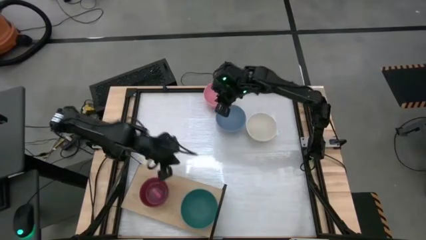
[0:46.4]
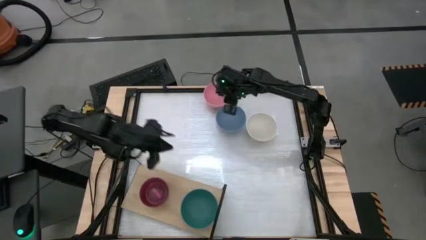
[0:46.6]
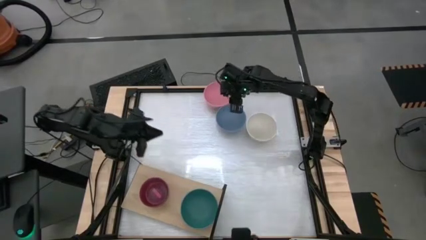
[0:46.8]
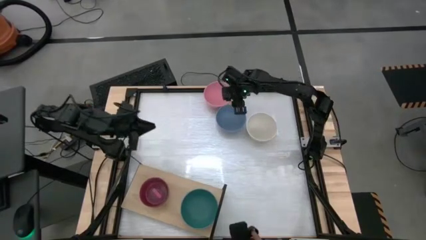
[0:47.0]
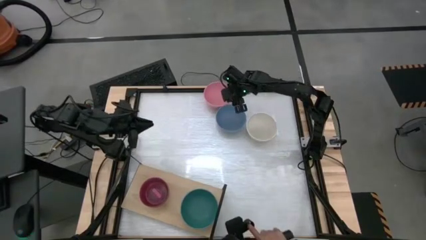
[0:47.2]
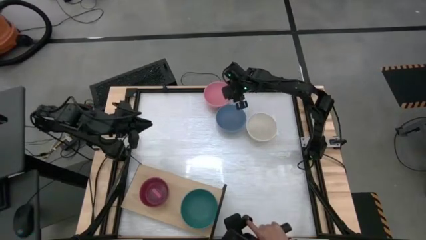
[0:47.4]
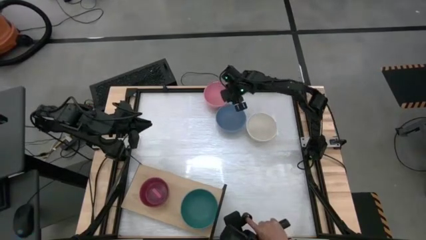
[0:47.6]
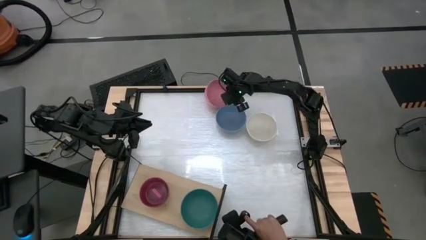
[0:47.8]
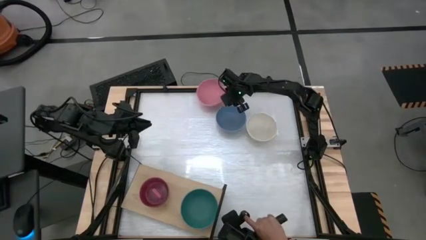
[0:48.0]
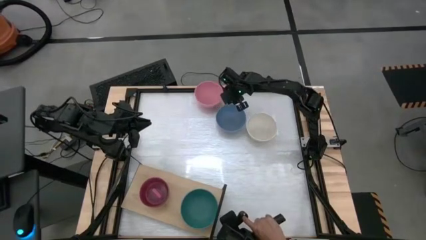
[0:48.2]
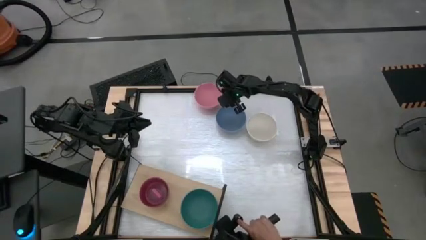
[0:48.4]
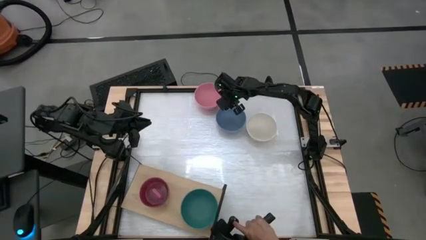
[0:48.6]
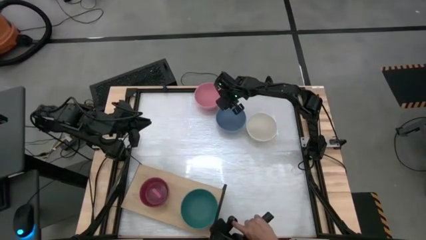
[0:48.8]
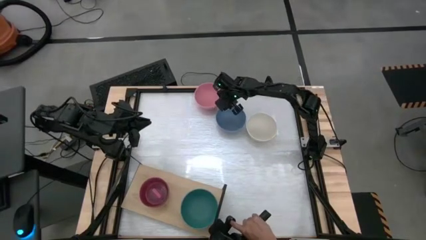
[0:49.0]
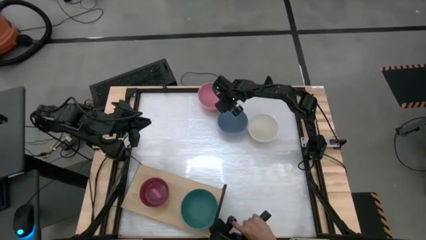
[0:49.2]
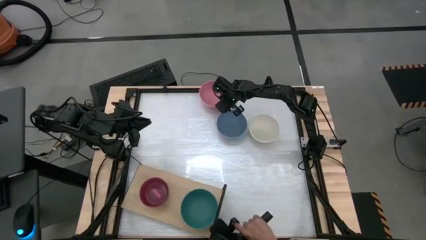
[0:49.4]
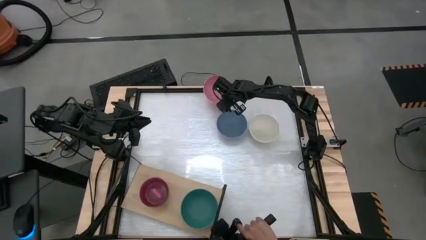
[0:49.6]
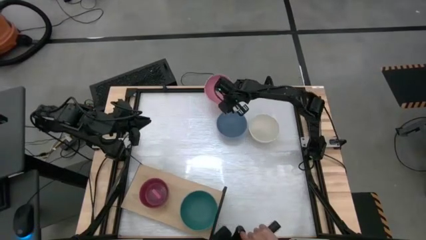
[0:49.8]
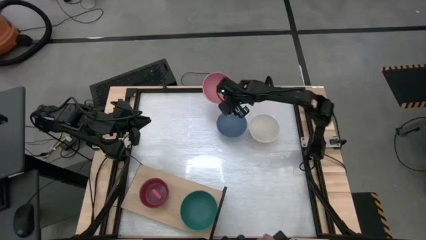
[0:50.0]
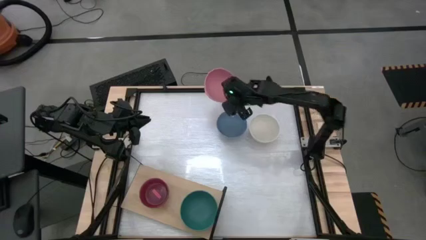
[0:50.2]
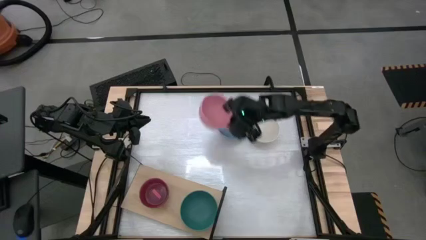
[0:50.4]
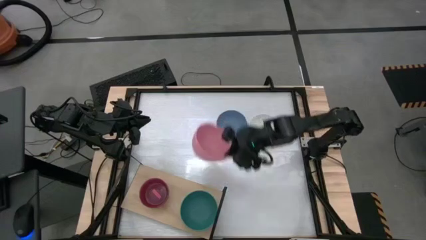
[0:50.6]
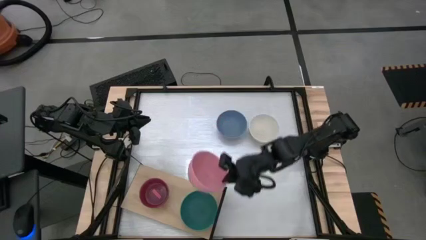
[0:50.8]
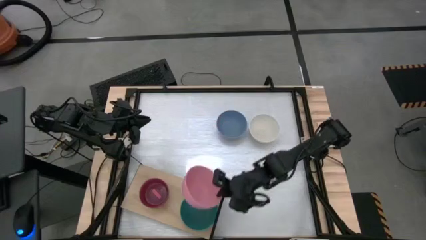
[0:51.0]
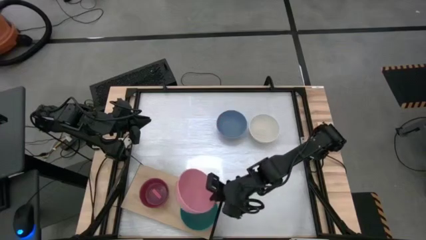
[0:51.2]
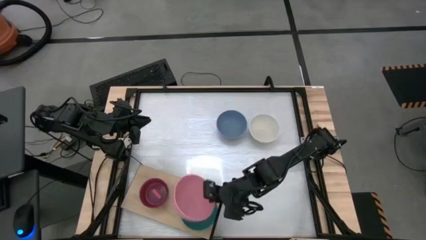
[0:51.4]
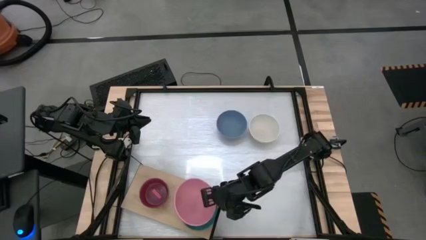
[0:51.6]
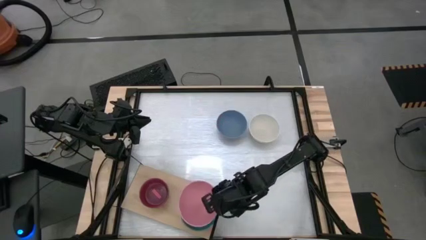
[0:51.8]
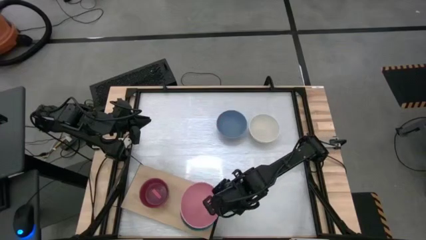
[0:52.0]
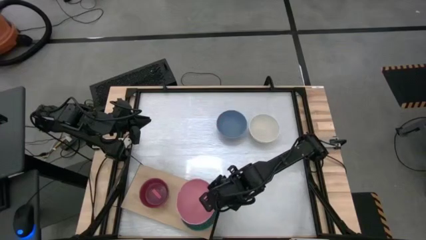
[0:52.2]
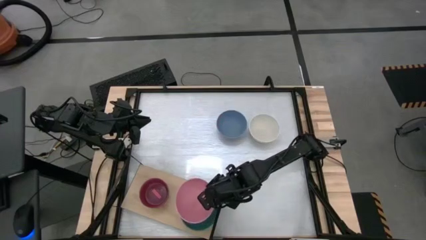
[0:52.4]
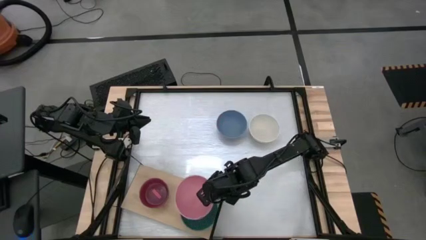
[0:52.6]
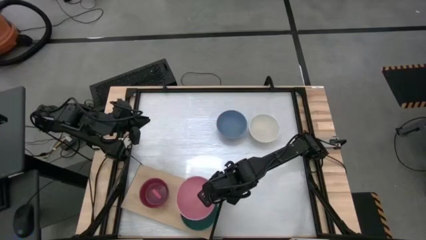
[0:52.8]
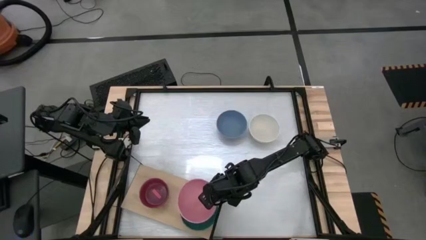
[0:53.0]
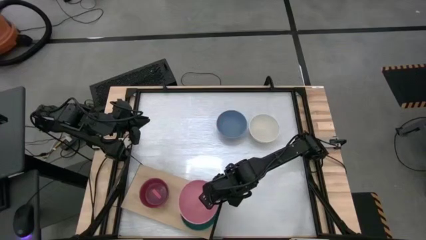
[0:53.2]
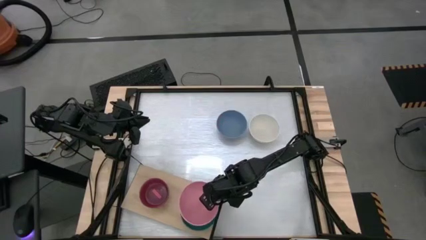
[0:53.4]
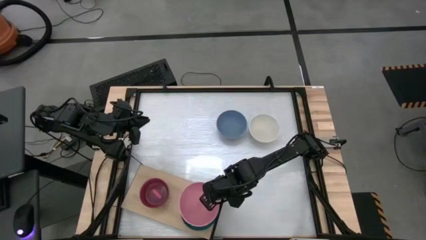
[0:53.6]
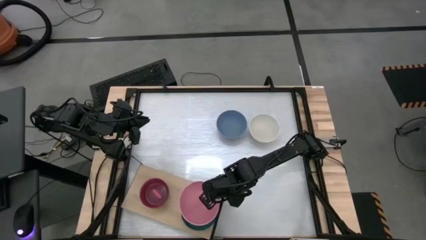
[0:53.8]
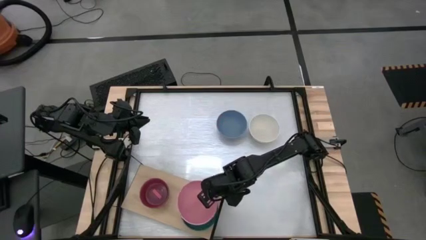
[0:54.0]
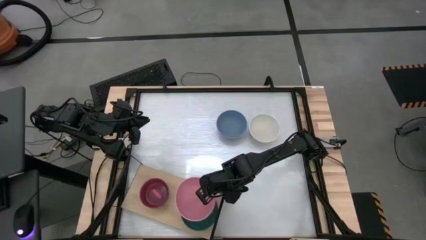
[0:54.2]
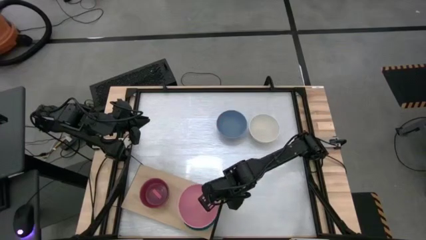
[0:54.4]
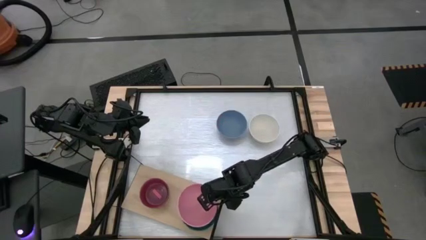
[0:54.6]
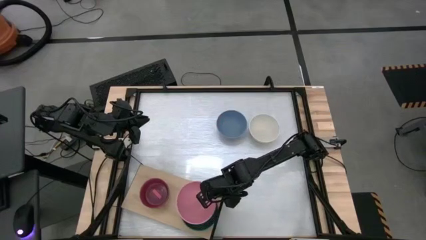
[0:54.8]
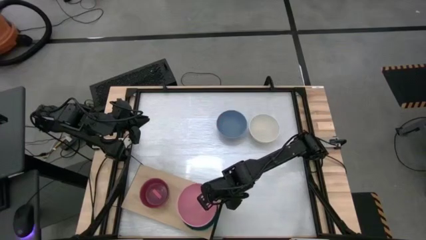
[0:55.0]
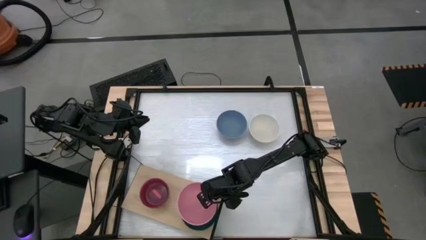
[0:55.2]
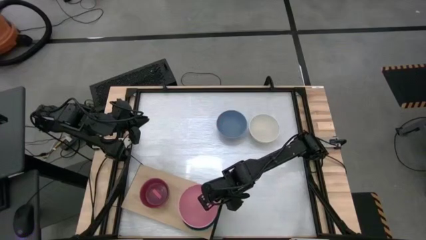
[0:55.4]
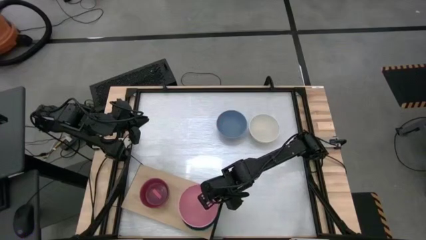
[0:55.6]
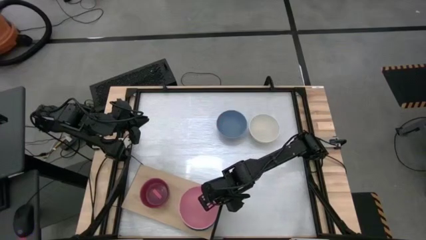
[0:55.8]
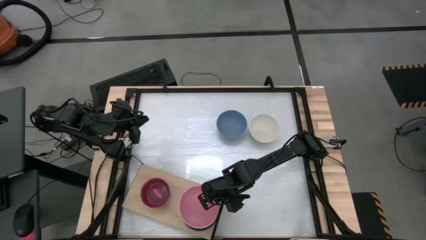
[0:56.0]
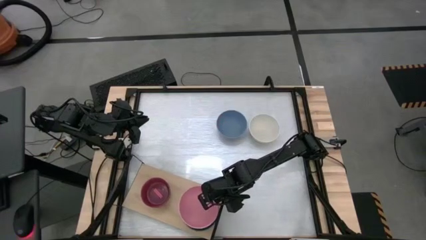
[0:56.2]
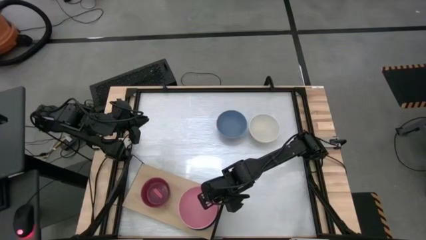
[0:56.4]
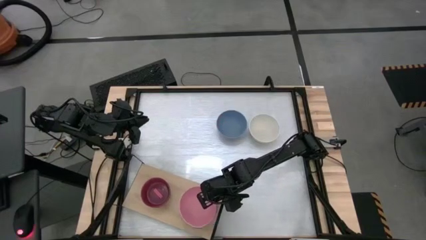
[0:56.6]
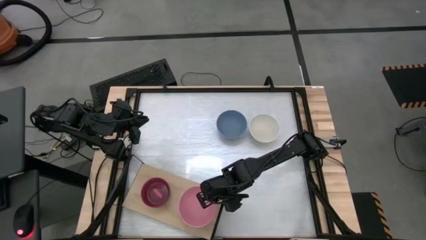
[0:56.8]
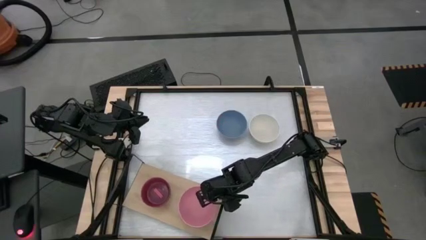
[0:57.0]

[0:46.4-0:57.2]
Task: Place and stack bowls onto a shelf
Put the light pink bowl on top of the dark green bowl on the shelf

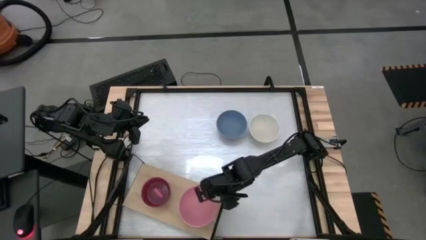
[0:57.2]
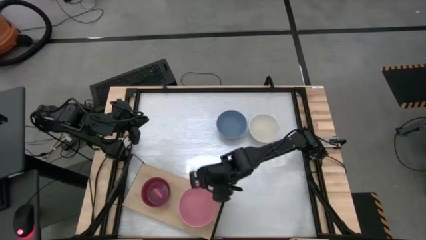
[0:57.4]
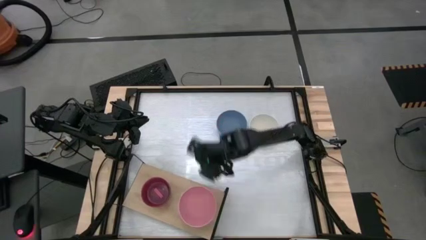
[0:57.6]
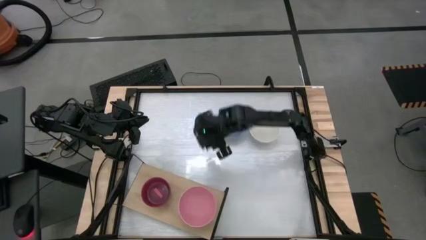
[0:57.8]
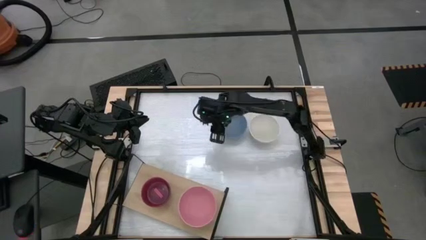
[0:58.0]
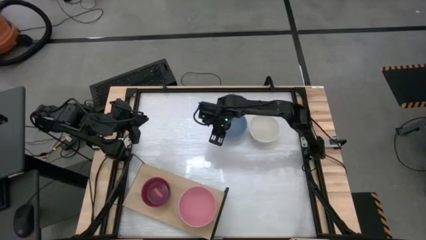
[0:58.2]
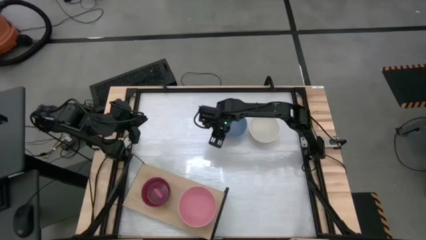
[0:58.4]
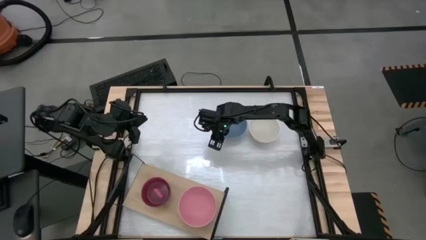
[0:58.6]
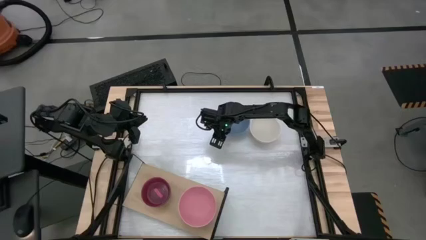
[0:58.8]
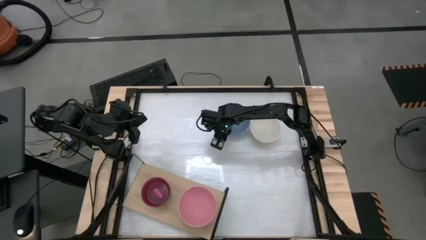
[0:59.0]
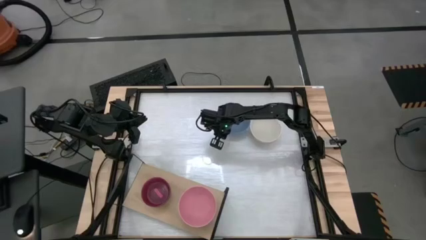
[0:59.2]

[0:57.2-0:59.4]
Stack the blue bowl on top of the pink bowl on the shelf
